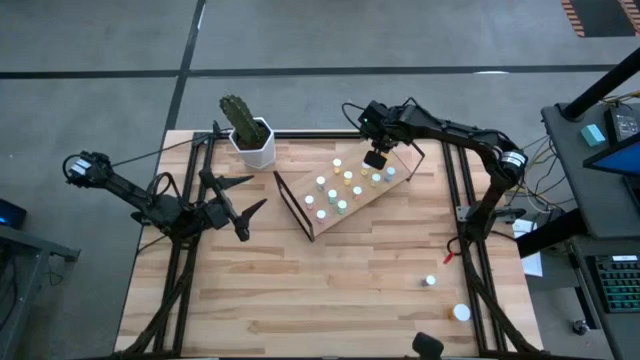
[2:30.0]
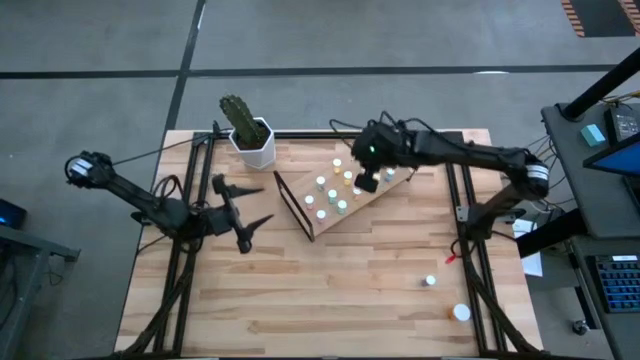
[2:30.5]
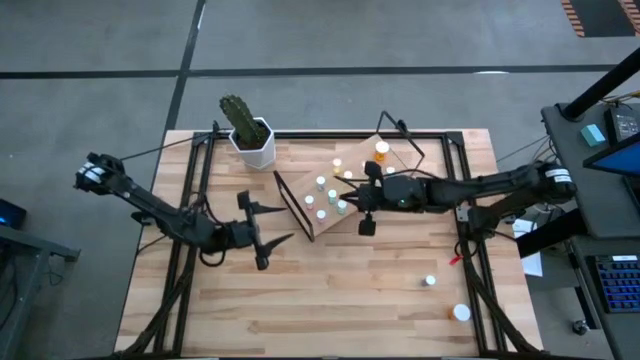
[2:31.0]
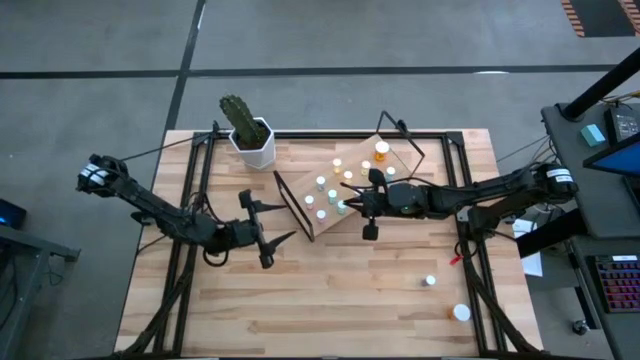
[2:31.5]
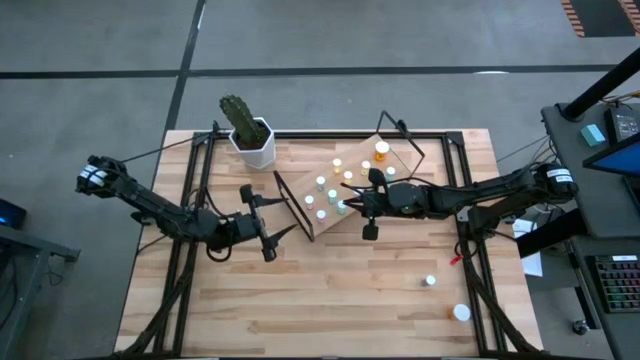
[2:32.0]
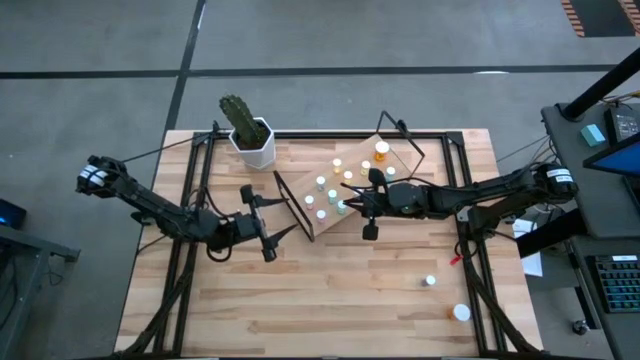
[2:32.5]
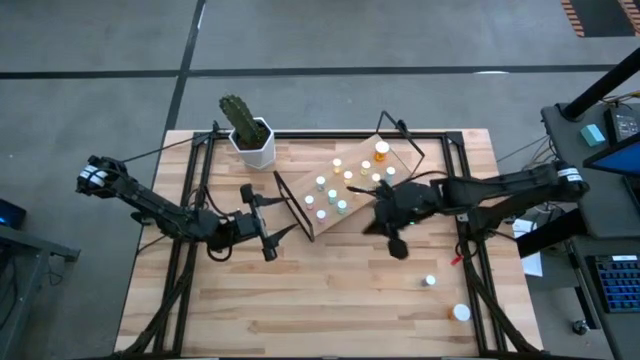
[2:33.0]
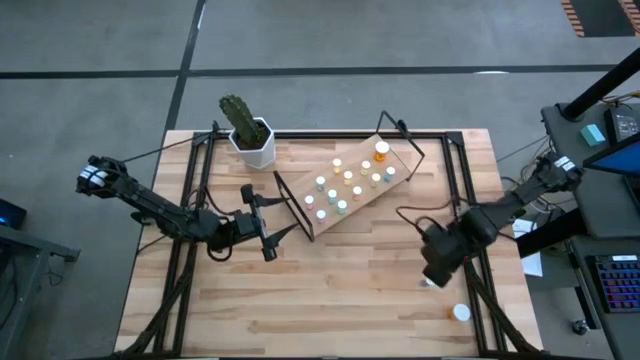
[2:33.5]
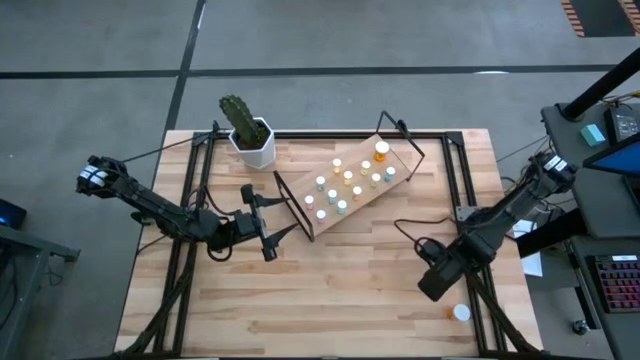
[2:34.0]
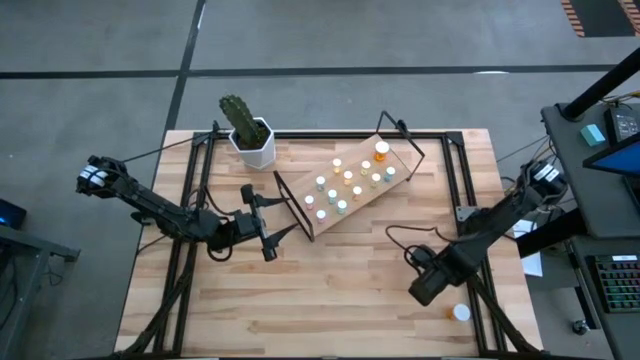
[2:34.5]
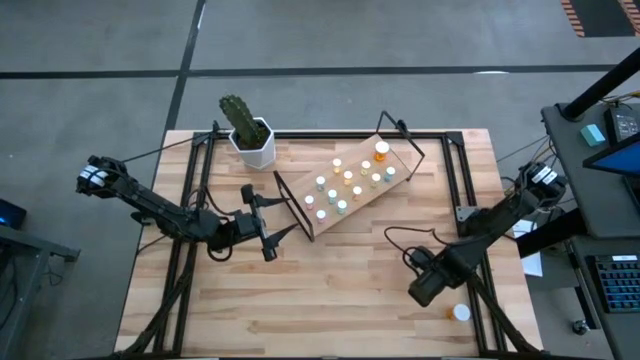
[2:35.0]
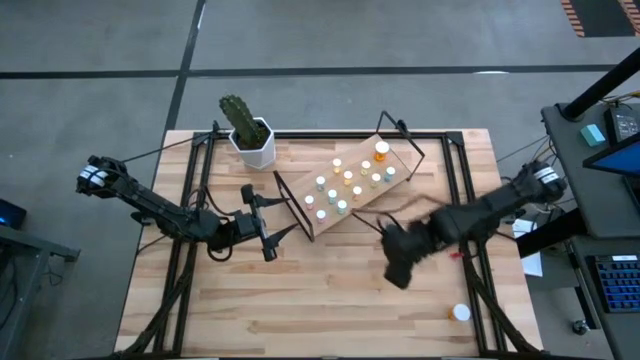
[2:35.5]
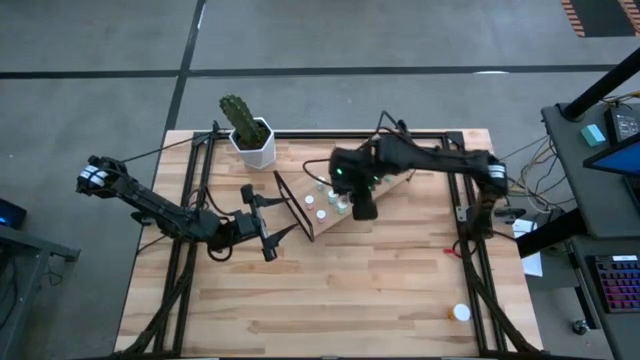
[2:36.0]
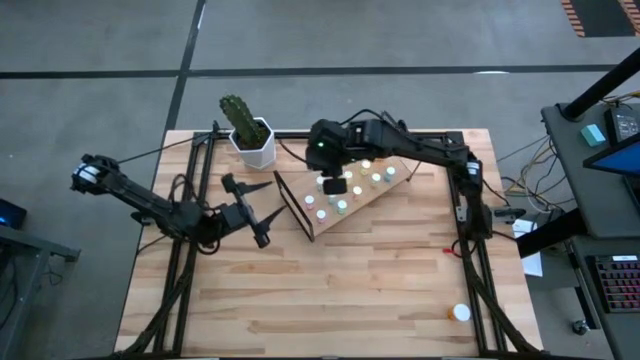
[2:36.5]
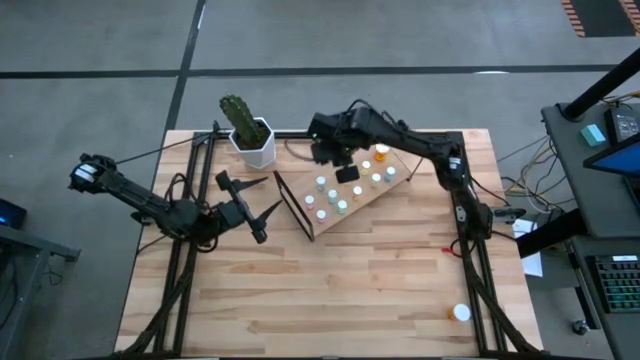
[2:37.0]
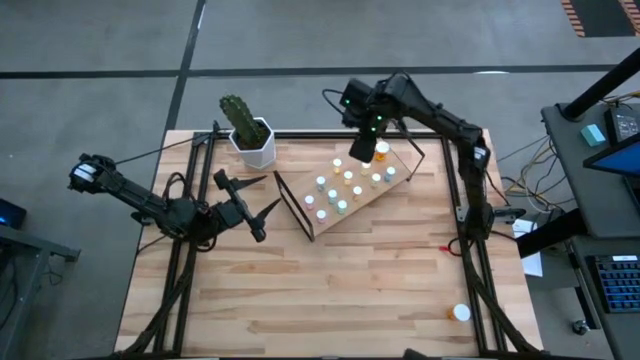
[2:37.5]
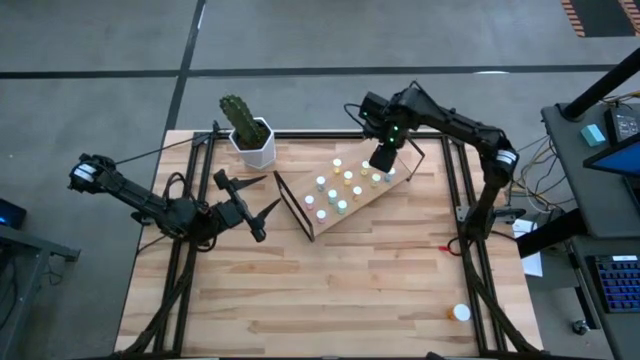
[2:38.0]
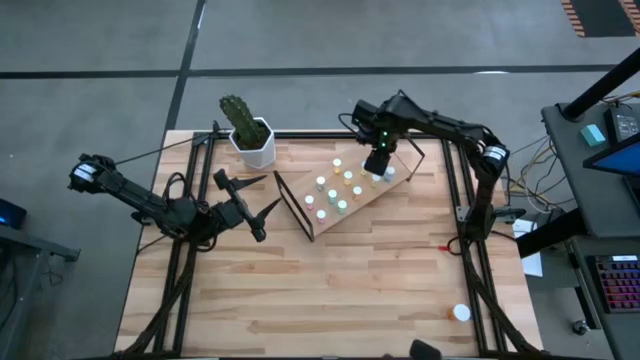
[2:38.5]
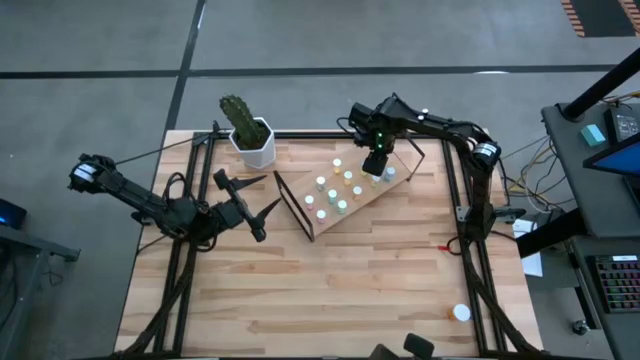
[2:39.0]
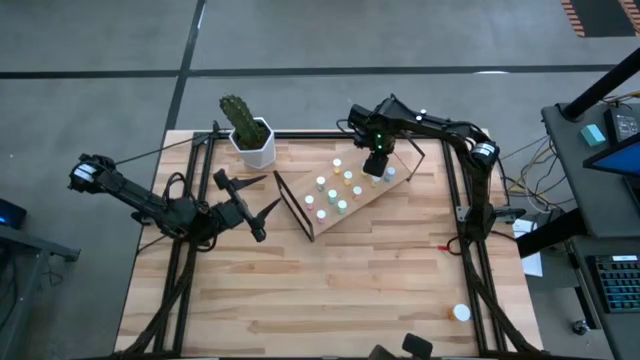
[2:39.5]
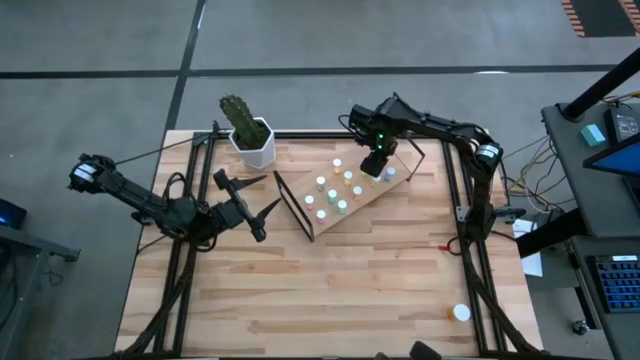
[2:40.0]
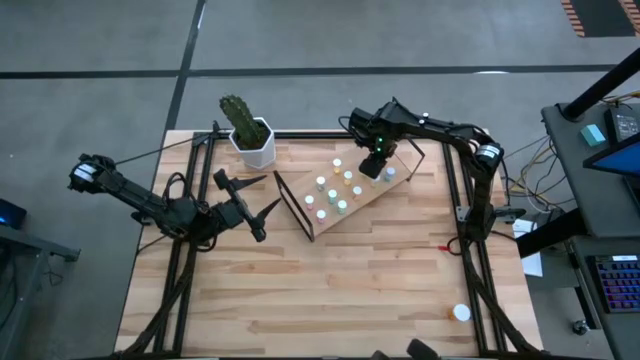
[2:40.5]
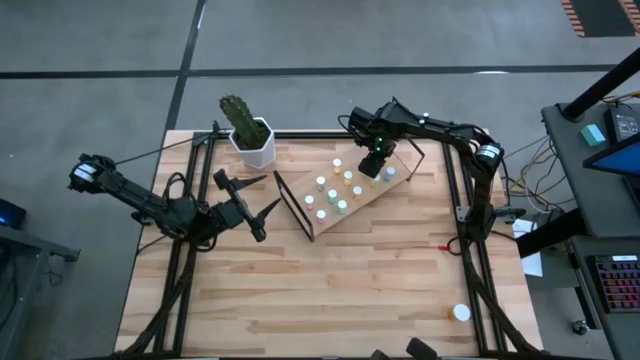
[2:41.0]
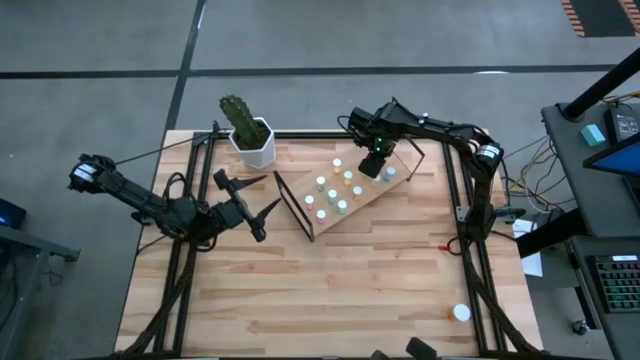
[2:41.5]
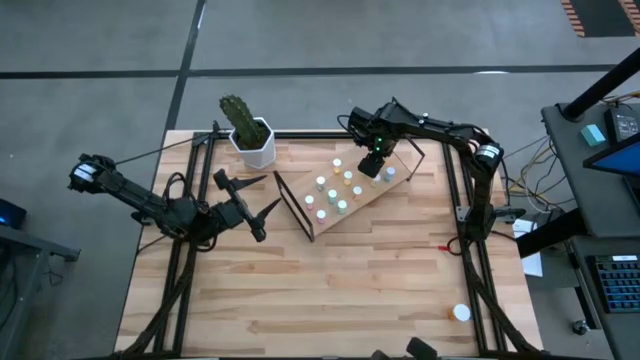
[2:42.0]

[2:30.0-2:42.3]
Task: Pick and place medicine bottles onto shelf by color
Put the blue pill bottle on the shelf aligned with the other blue pill bottle

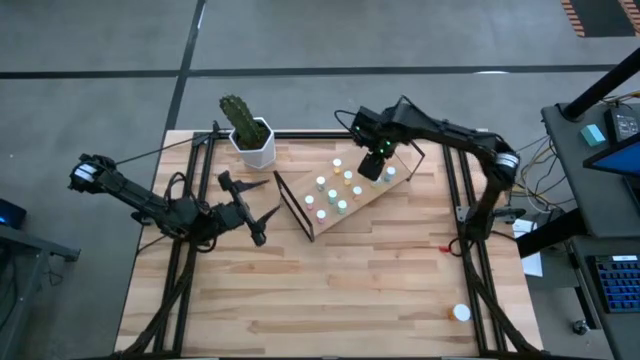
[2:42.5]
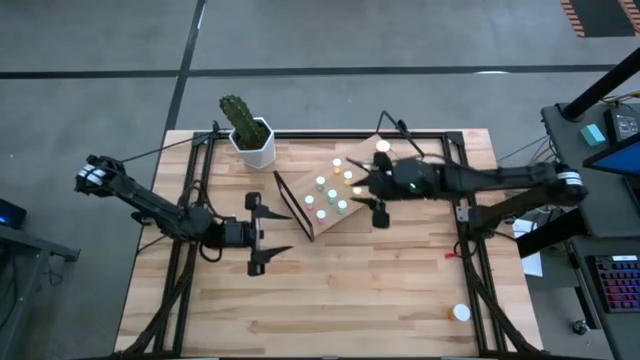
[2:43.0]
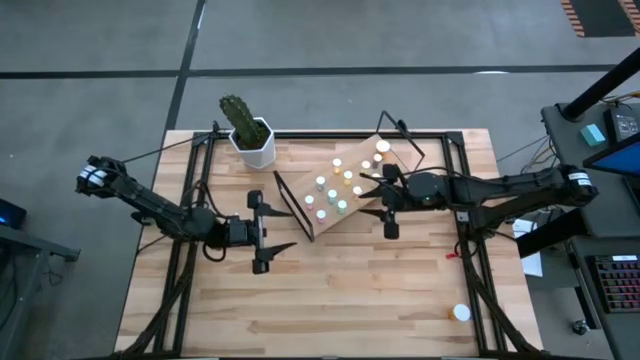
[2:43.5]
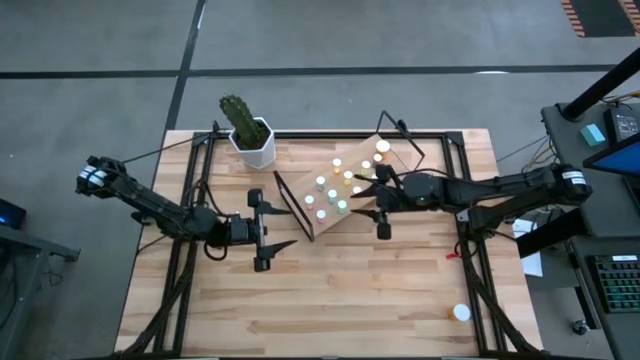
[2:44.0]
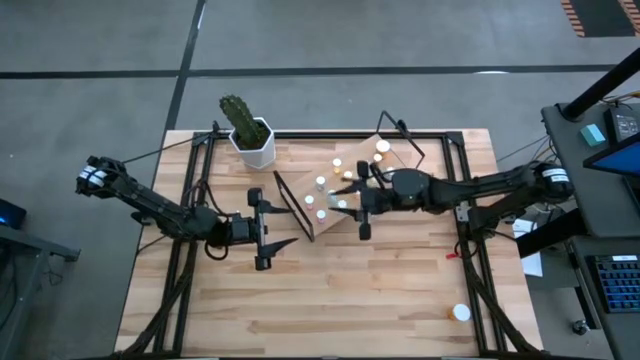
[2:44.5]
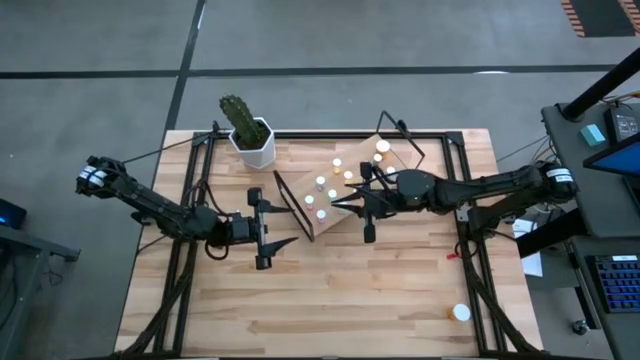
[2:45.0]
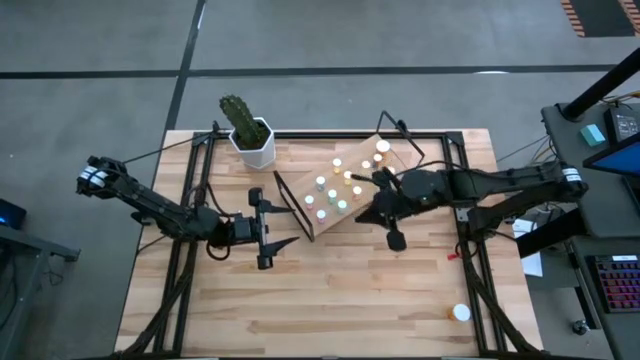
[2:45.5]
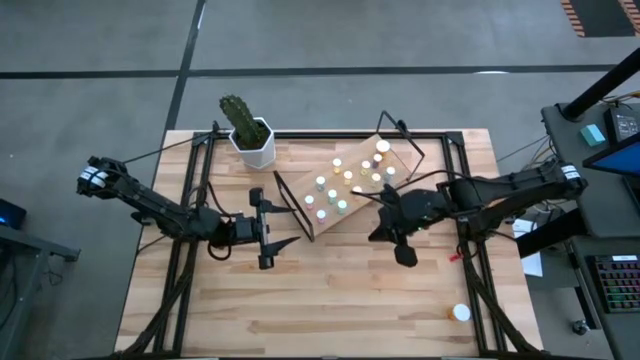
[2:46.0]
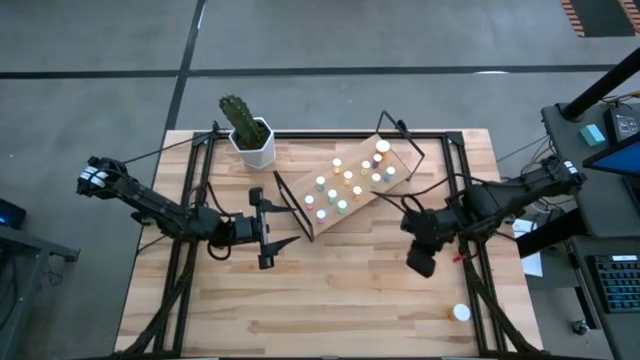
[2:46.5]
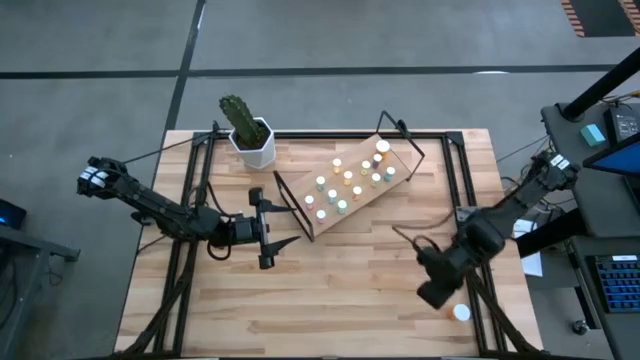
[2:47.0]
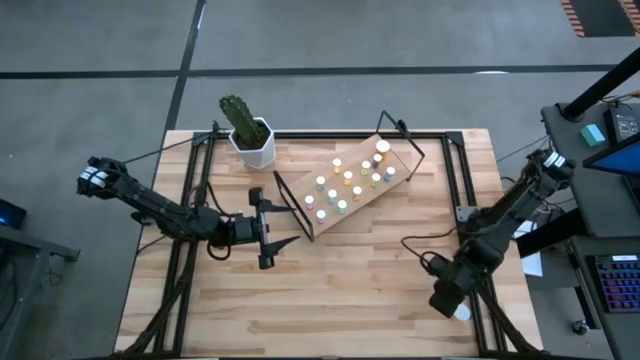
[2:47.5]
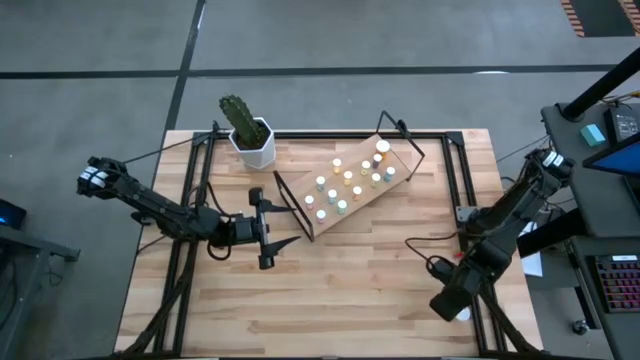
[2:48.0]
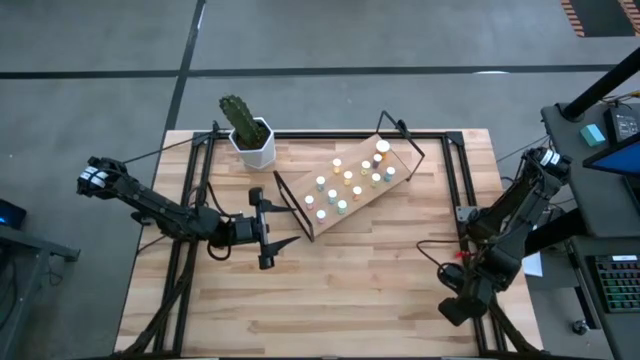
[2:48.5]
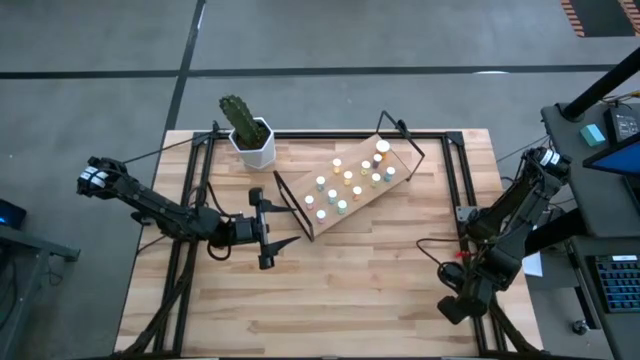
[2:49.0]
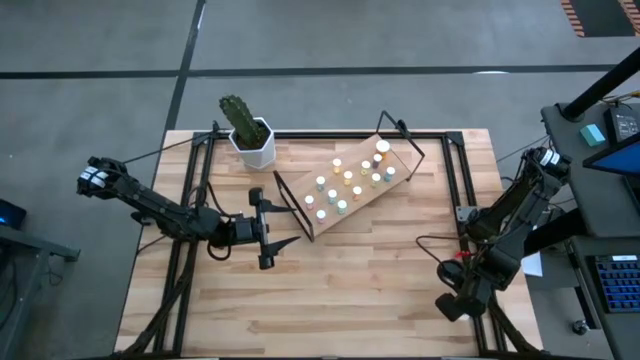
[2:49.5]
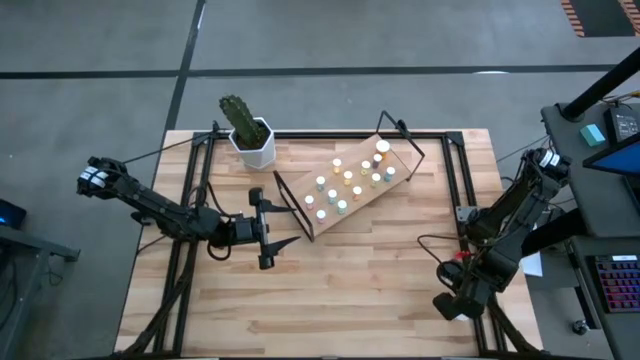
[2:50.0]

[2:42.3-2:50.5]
Put the orange pill bottle on the shelf aligned with the other orange pill bottle

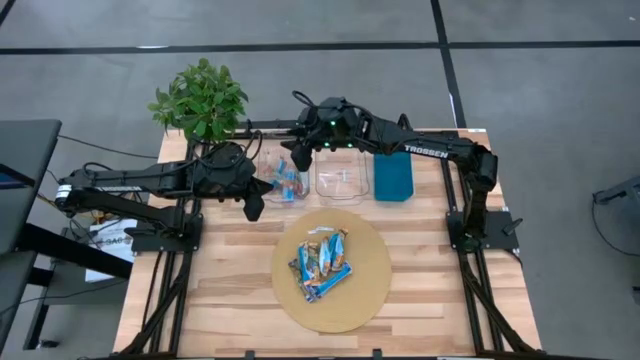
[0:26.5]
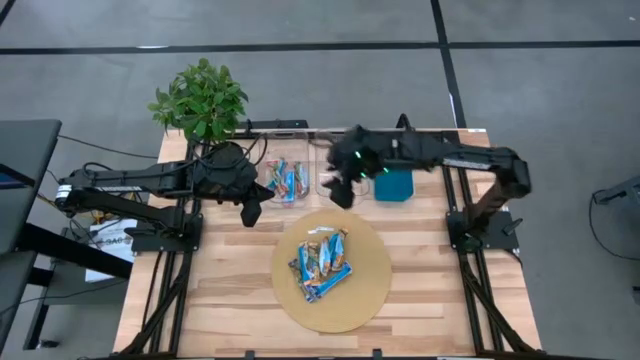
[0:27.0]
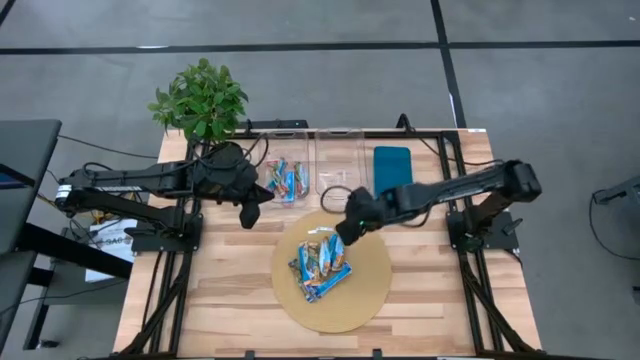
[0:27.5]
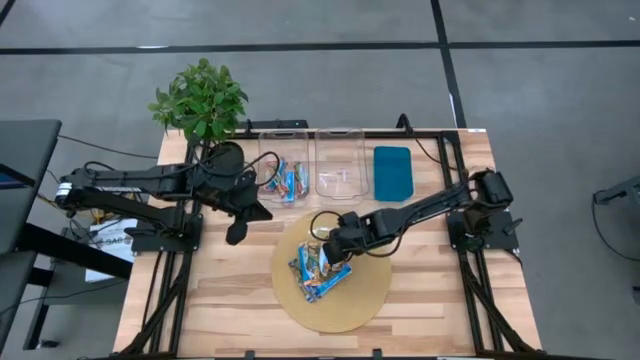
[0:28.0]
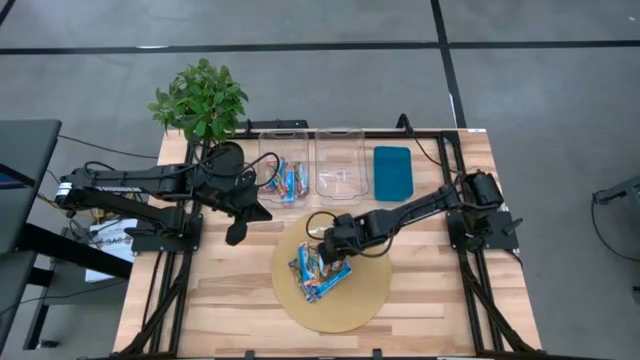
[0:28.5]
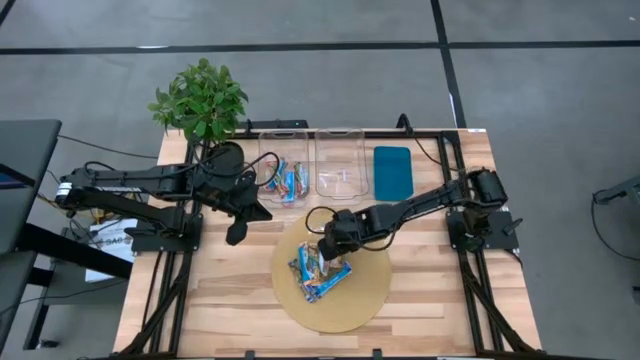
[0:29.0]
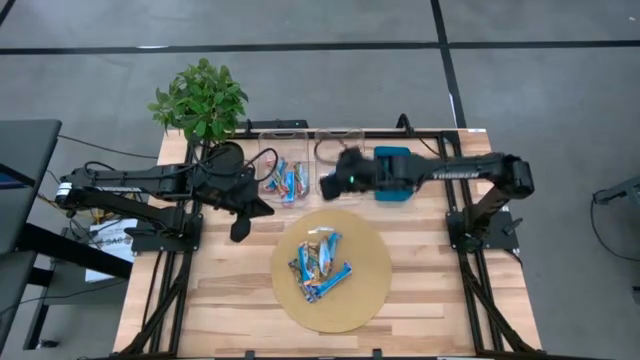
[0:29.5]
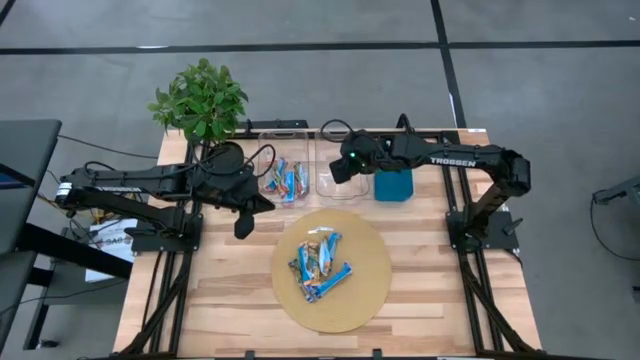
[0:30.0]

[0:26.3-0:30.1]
Task: Pick and place Granola Bars by type
Put the yellow granola bar into the right transparent bin
